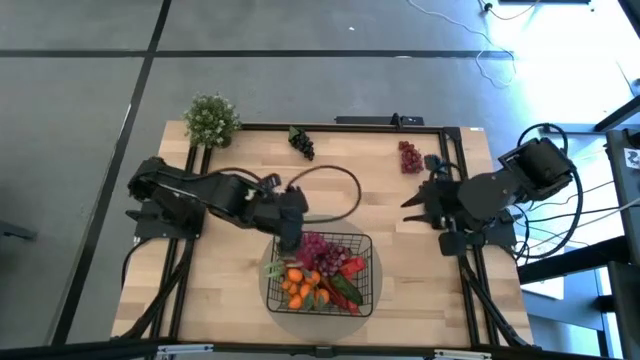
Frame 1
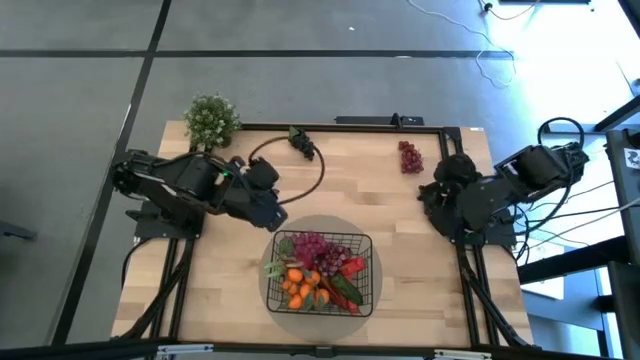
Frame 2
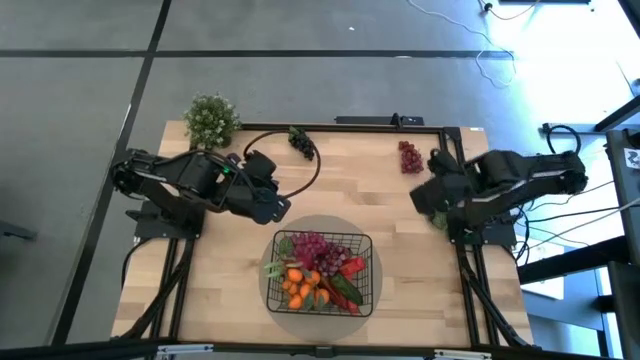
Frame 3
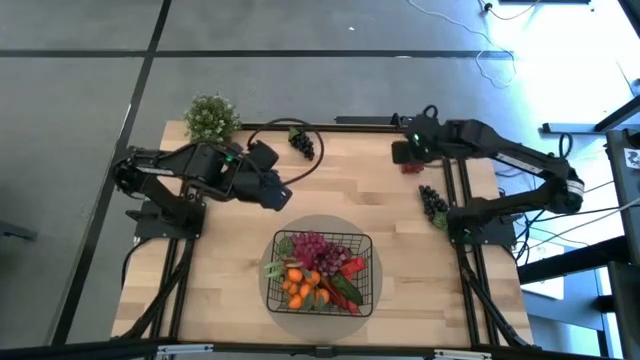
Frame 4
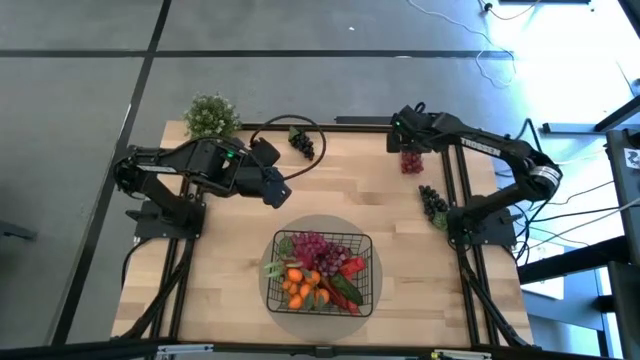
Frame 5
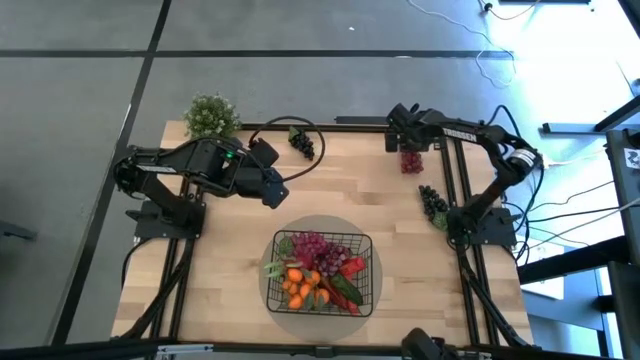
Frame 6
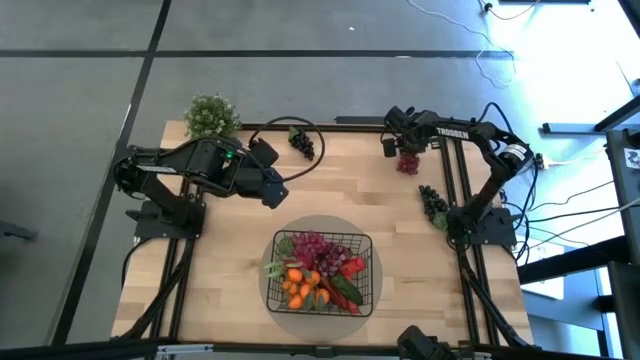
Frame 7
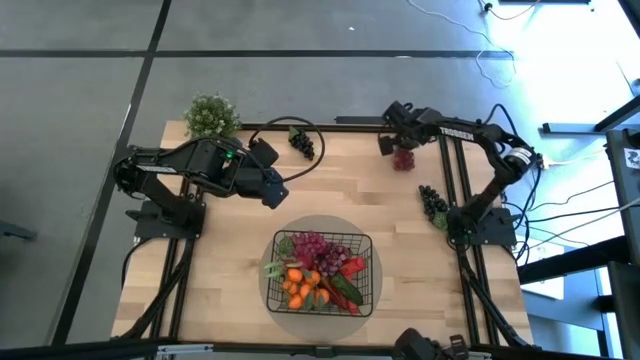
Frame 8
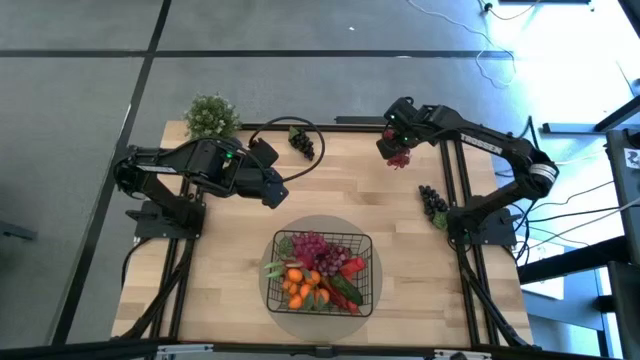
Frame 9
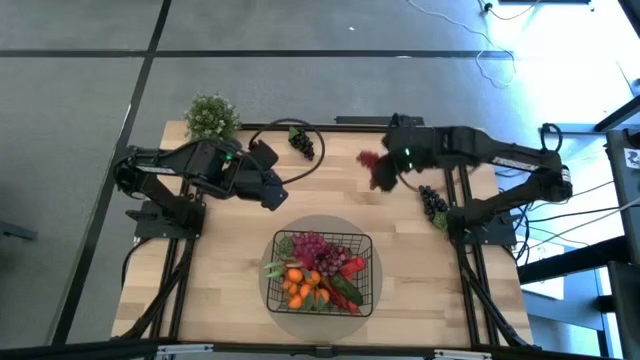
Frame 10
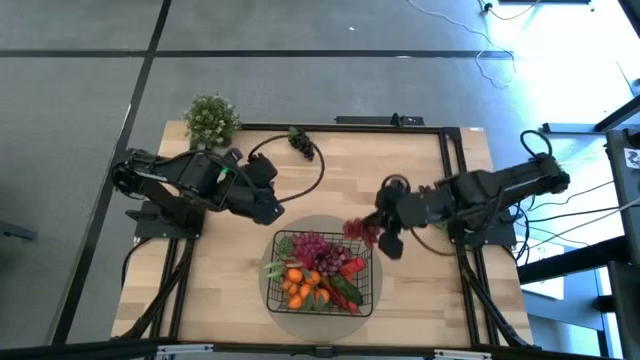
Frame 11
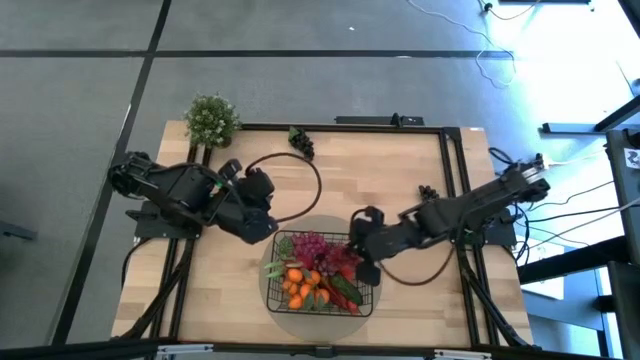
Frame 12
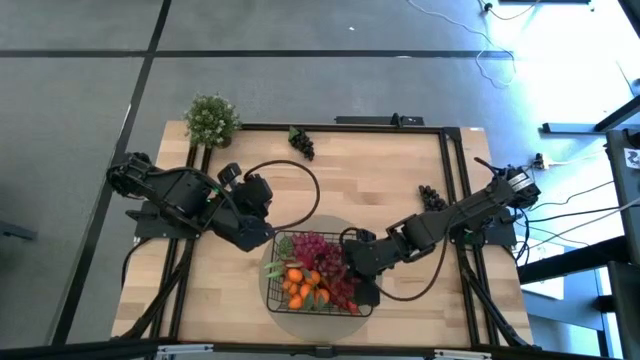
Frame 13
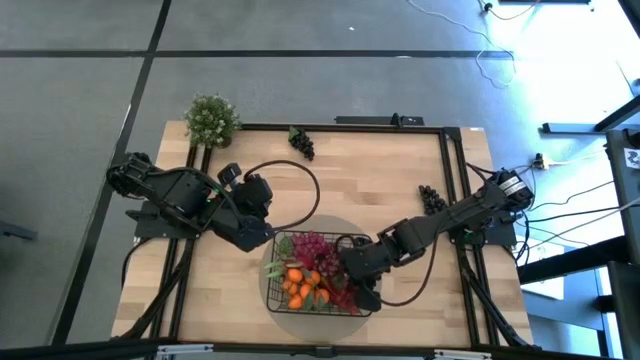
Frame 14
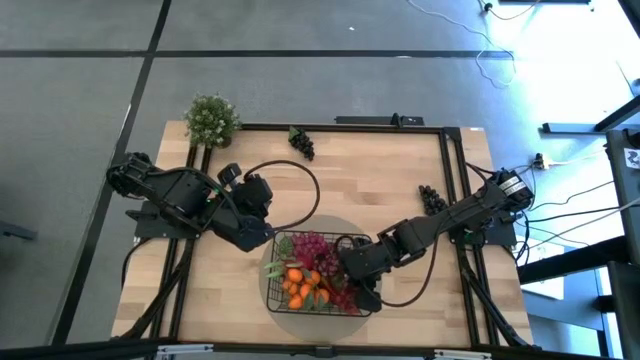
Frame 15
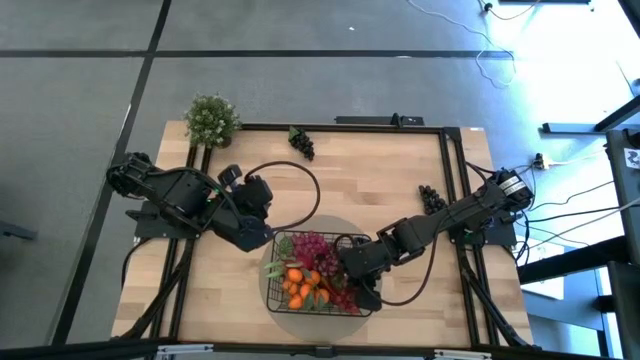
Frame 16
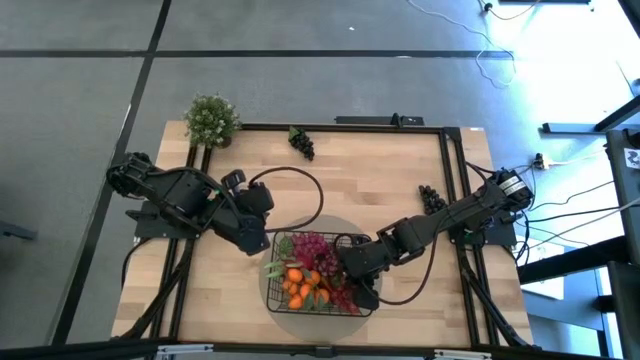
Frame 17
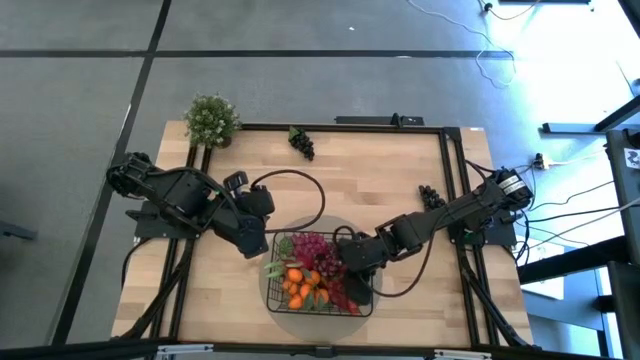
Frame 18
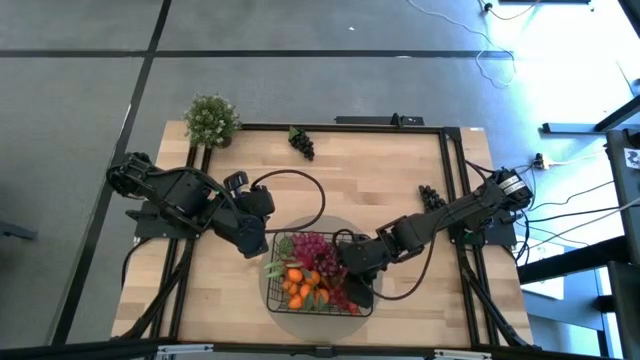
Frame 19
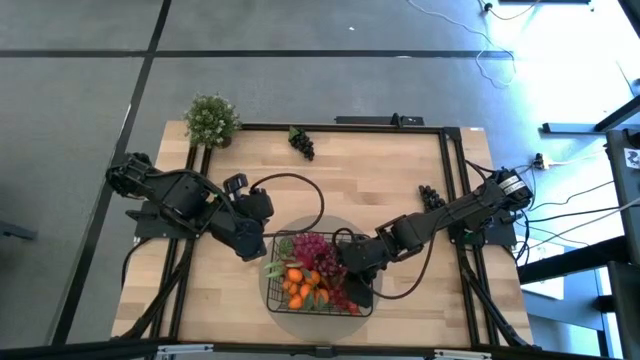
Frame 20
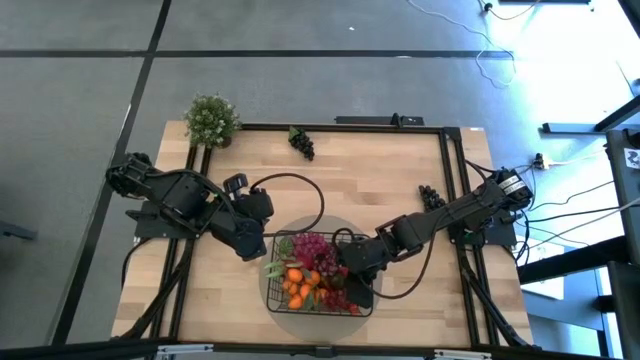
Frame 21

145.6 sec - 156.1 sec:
Task: Build produce basket
Put the red grapes into the black wire basket

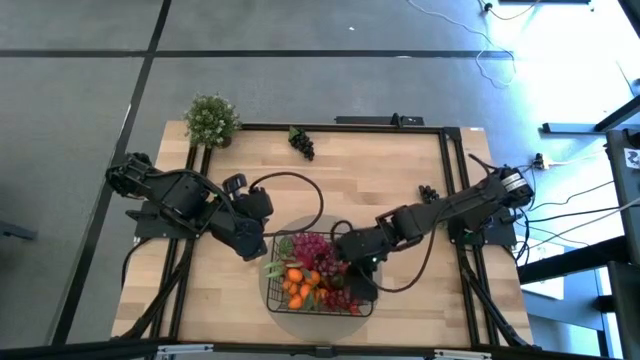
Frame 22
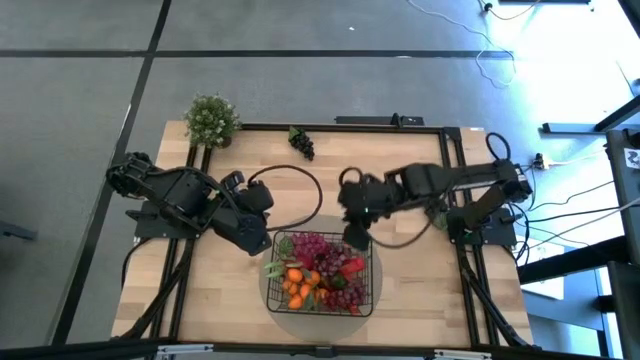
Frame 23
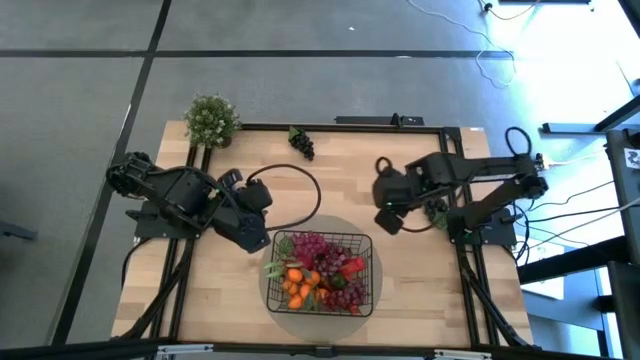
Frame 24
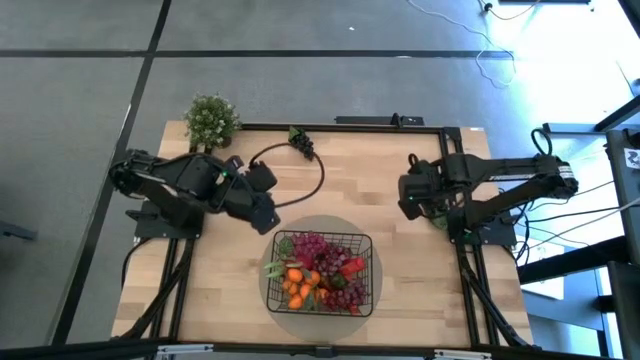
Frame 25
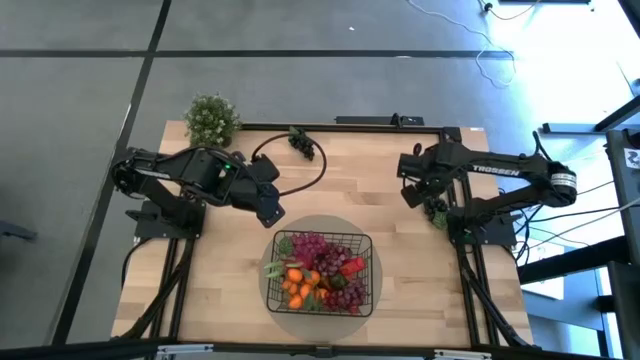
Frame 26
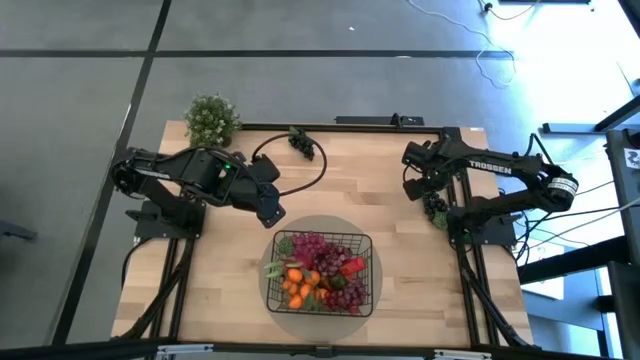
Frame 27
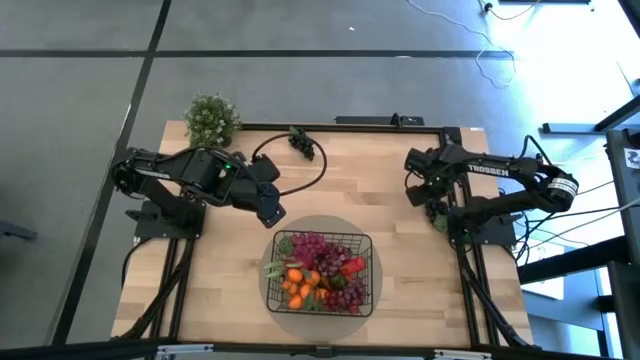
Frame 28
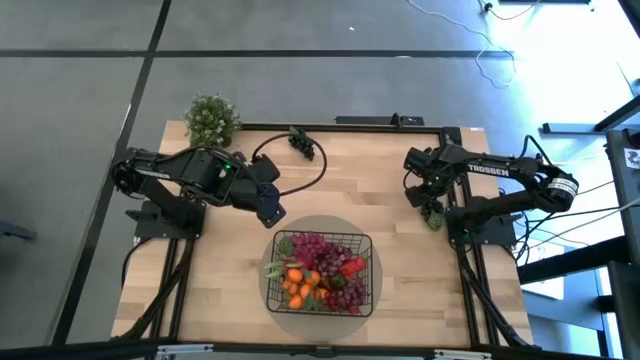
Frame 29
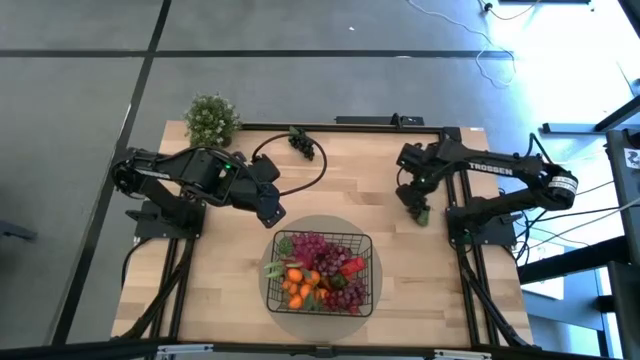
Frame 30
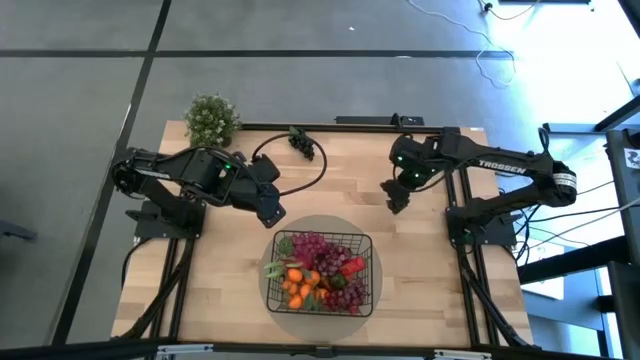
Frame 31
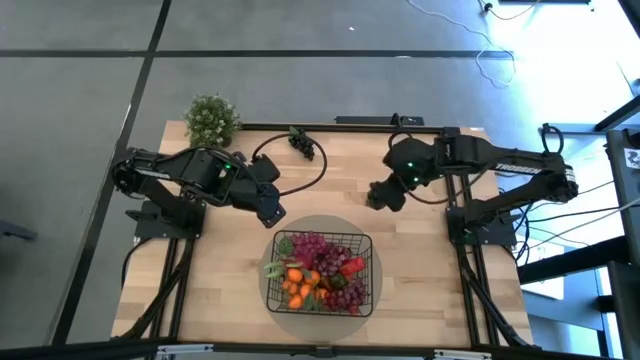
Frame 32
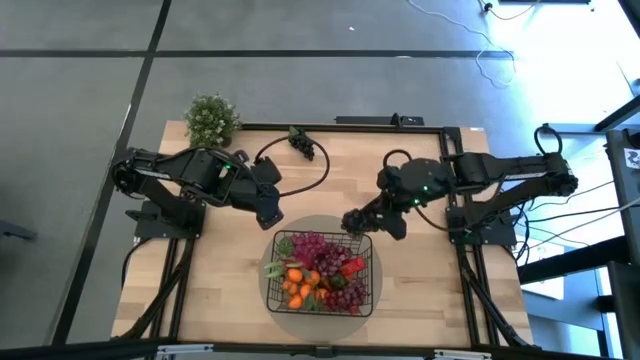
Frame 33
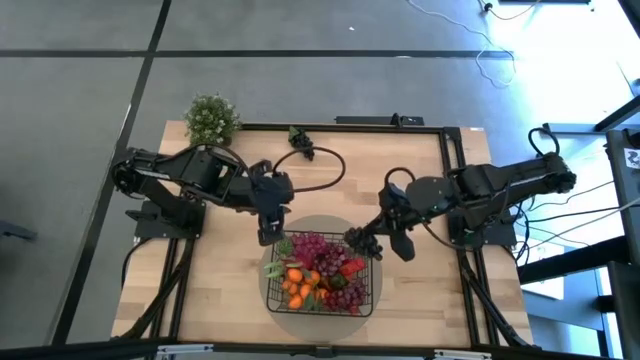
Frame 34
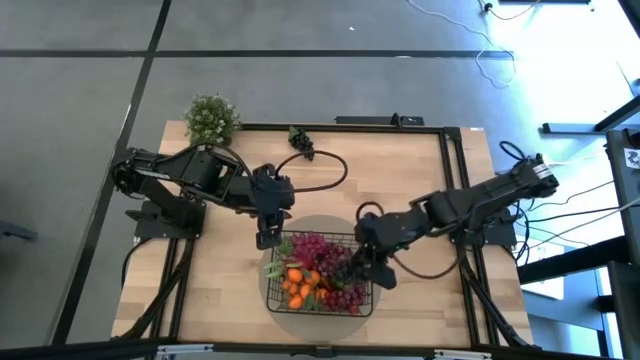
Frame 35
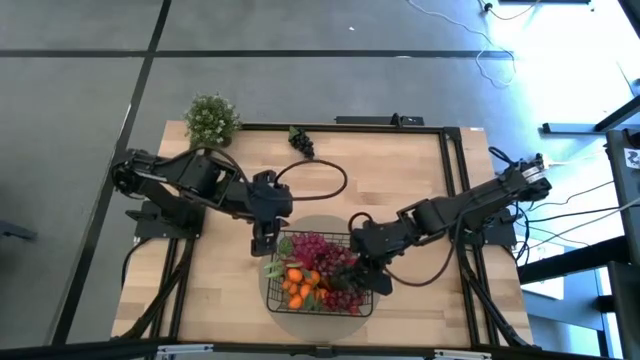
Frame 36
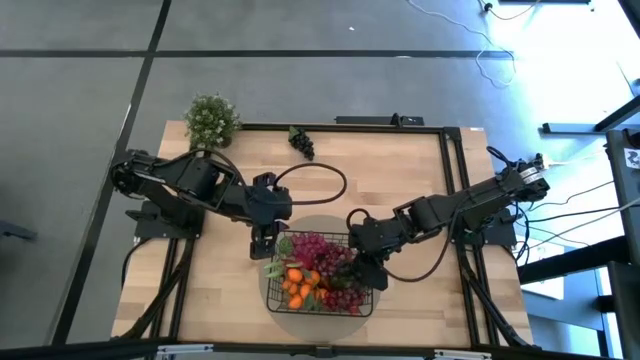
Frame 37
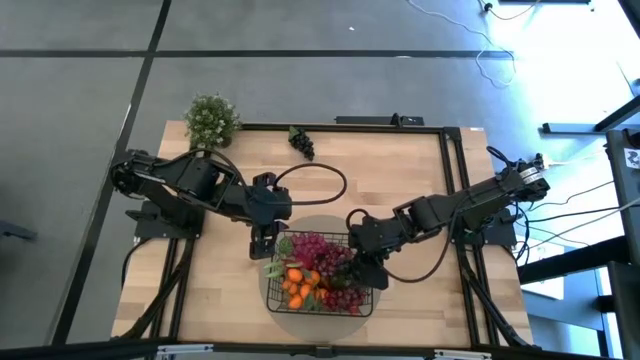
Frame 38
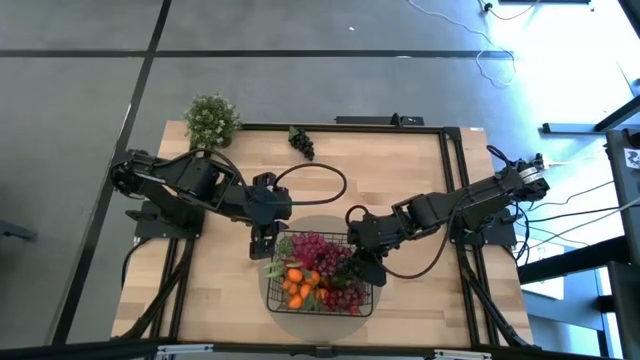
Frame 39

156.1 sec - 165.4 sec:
Put the bottom purple grapes into the black wire basket

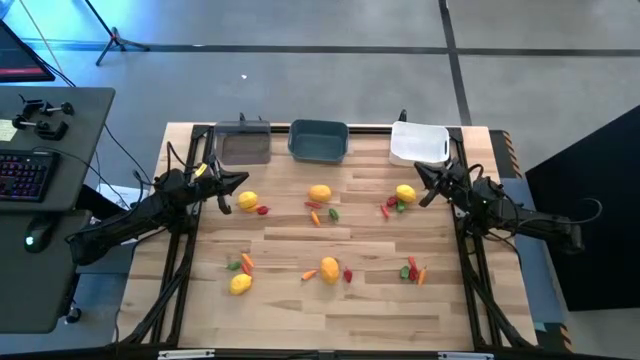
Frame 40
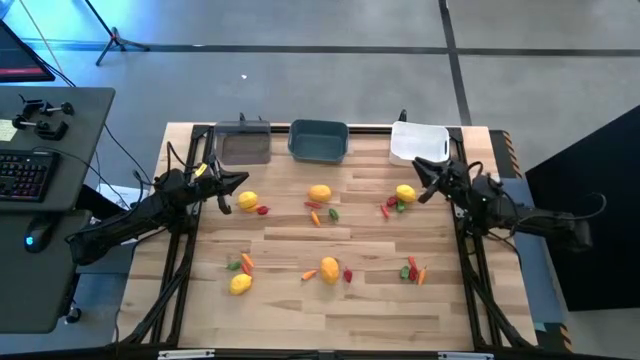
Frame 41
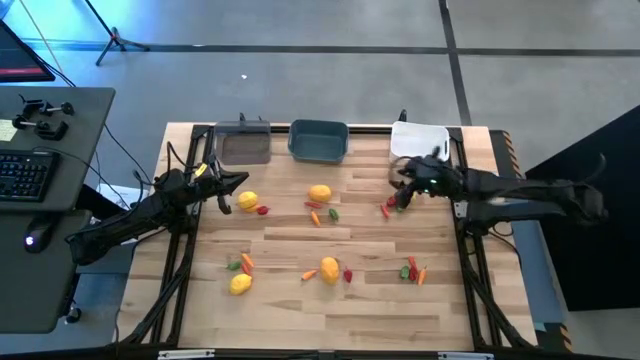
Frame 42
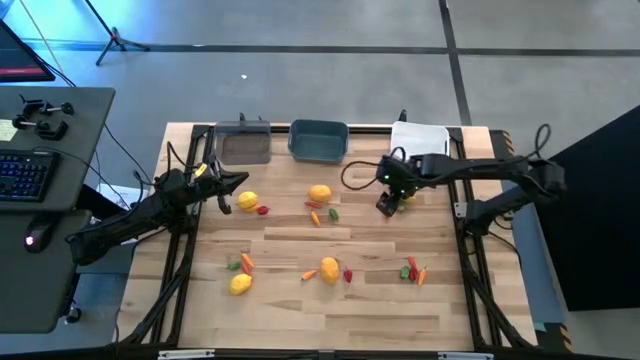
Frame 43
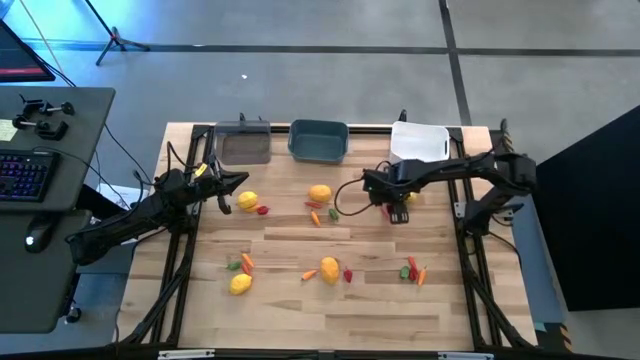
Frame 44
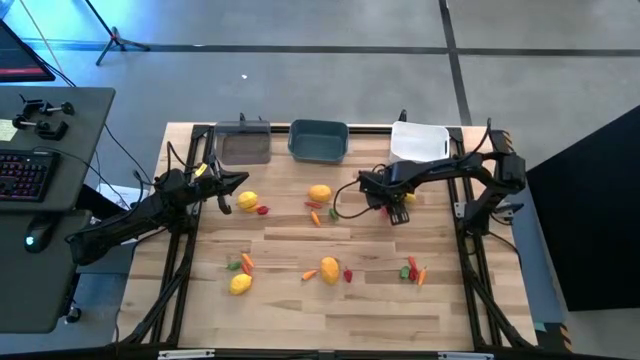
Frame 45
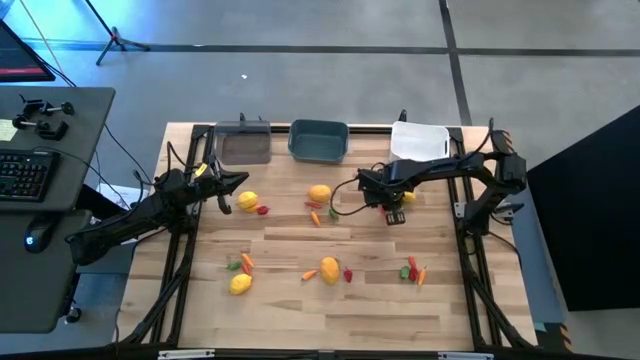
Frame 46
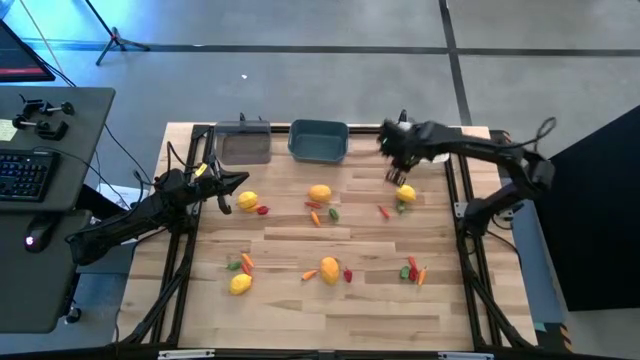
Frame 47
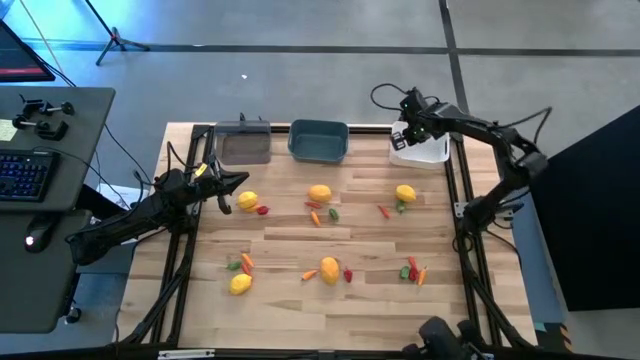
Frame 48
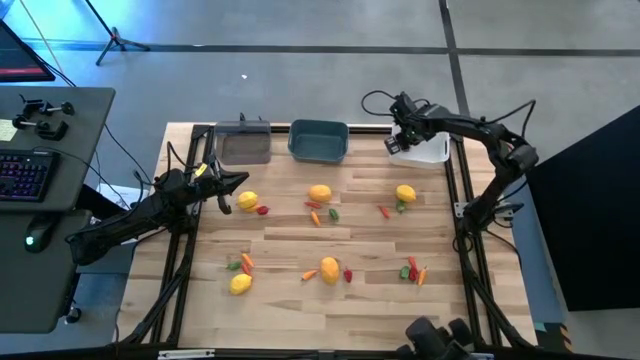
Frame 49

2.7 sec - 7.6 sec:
Task: Sort produce into baskets
Put the red chili pepper into the white bin
